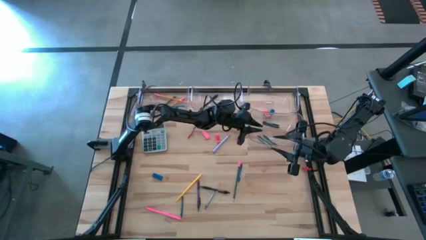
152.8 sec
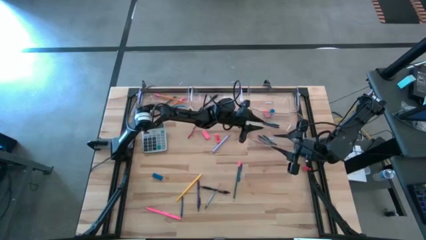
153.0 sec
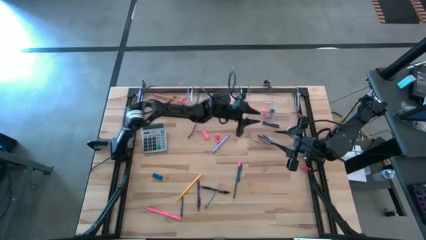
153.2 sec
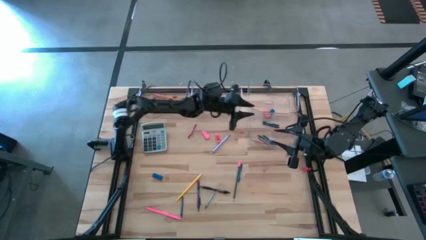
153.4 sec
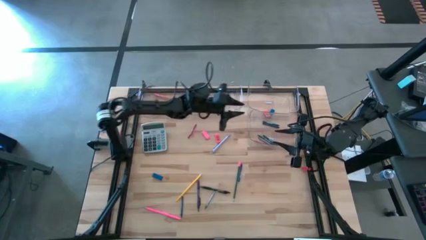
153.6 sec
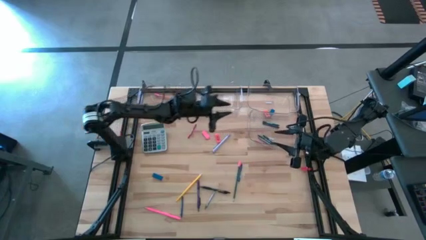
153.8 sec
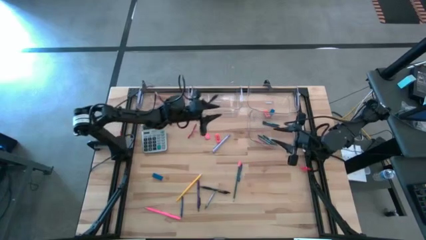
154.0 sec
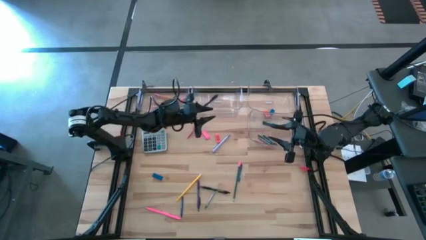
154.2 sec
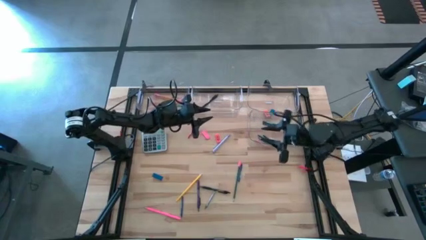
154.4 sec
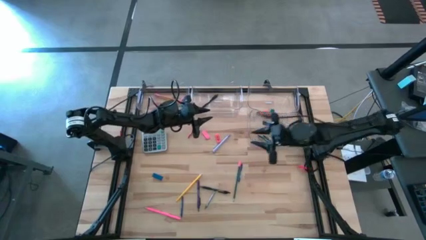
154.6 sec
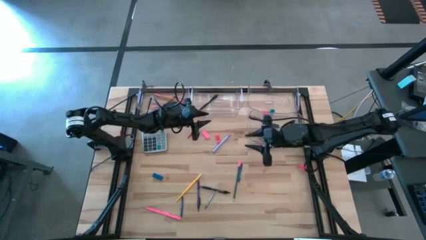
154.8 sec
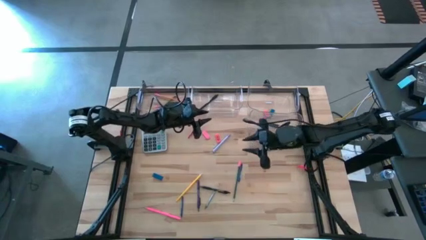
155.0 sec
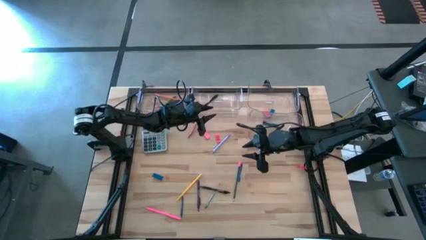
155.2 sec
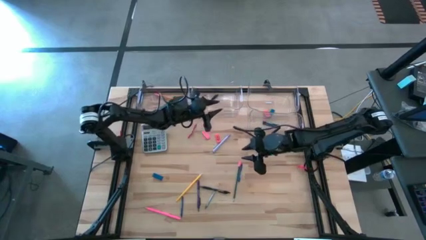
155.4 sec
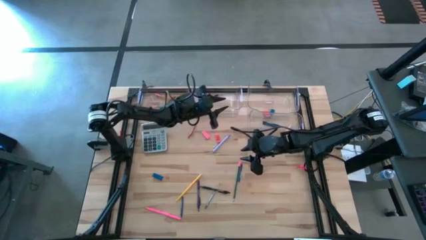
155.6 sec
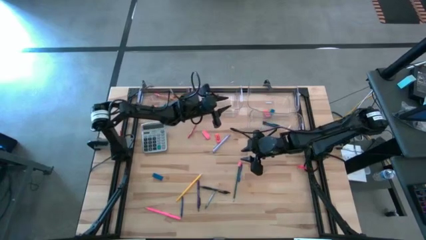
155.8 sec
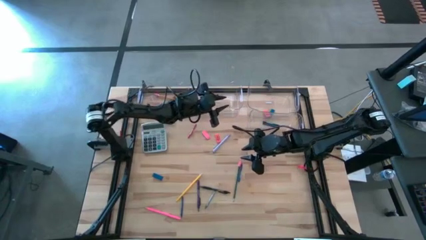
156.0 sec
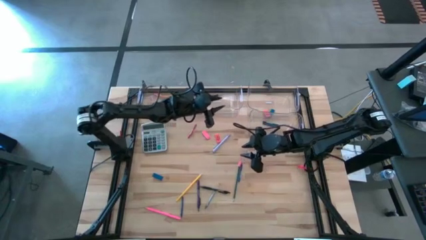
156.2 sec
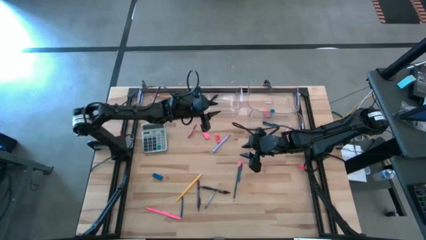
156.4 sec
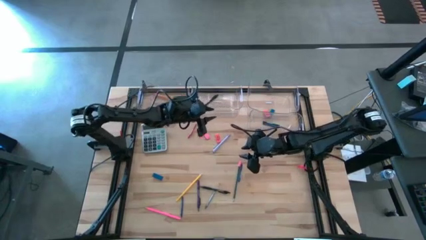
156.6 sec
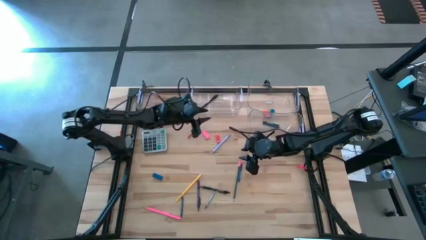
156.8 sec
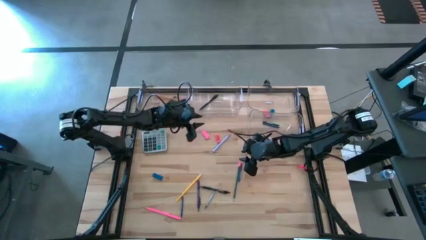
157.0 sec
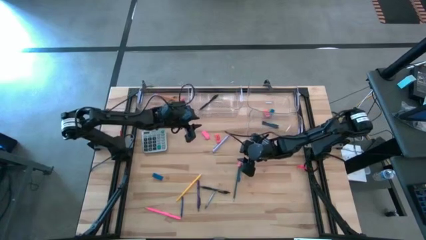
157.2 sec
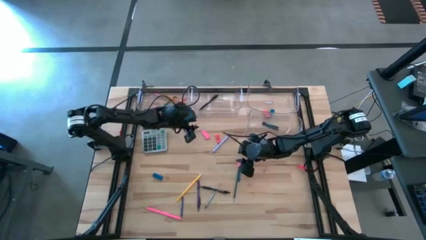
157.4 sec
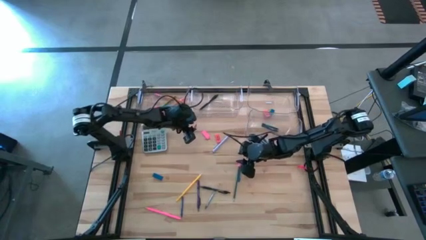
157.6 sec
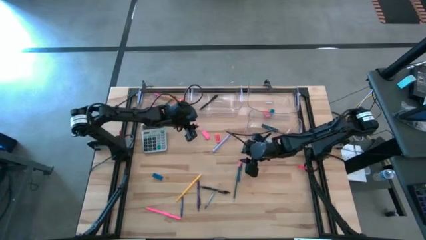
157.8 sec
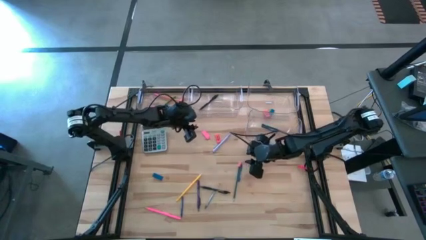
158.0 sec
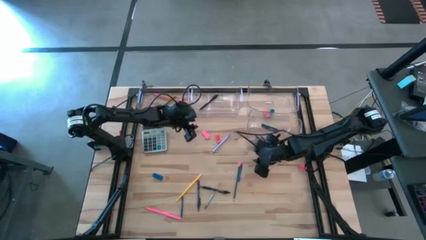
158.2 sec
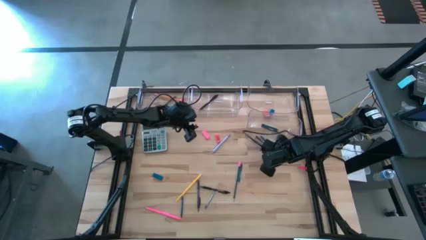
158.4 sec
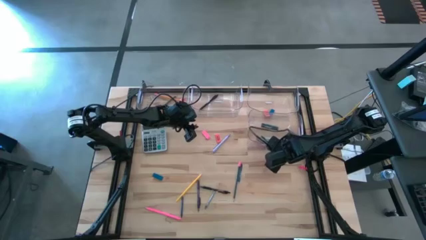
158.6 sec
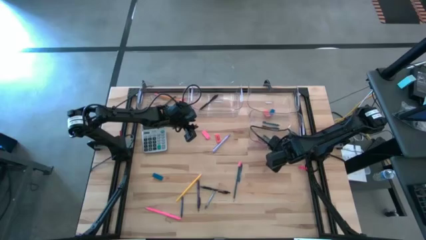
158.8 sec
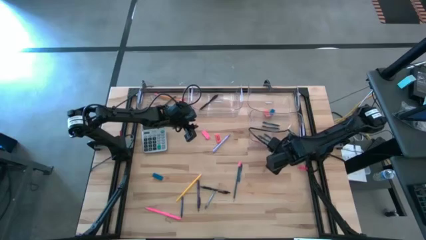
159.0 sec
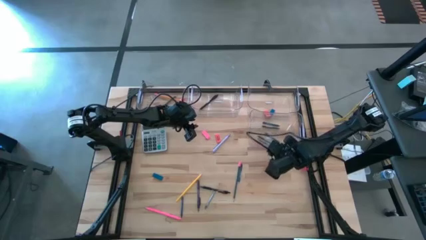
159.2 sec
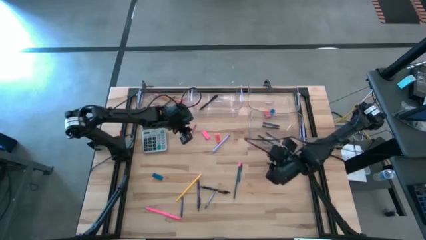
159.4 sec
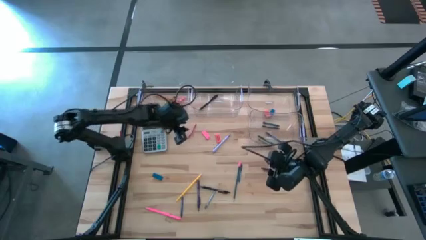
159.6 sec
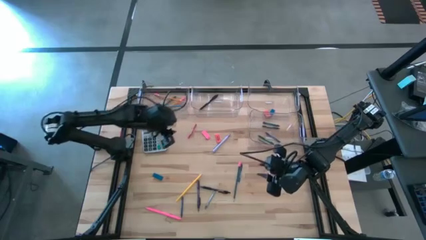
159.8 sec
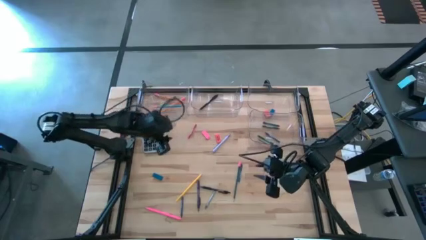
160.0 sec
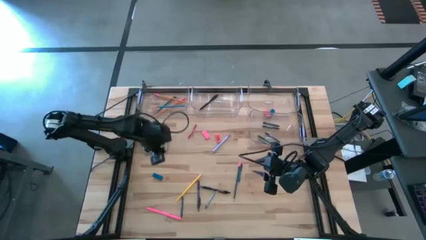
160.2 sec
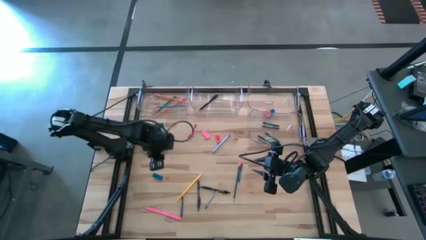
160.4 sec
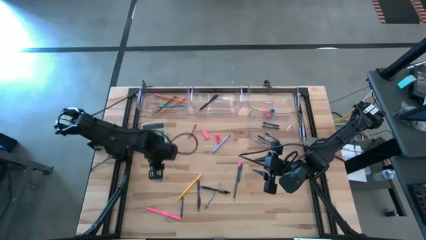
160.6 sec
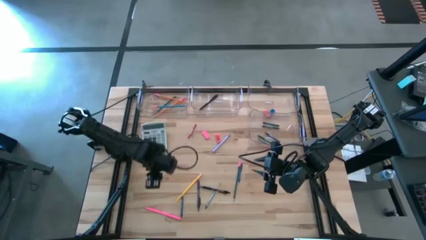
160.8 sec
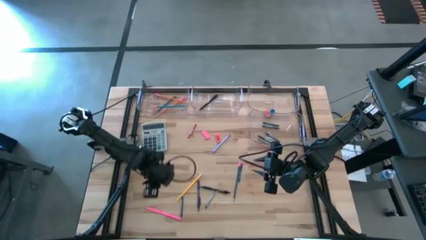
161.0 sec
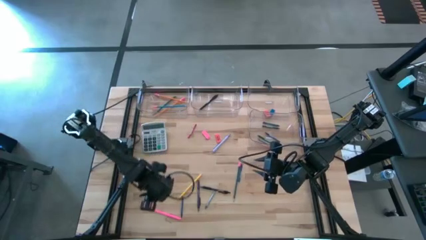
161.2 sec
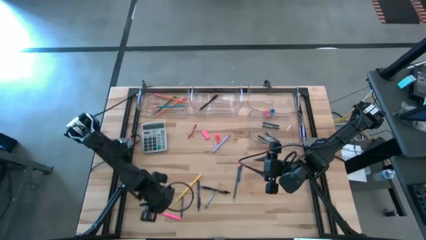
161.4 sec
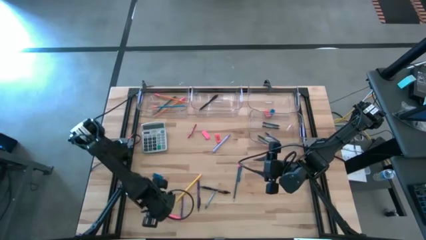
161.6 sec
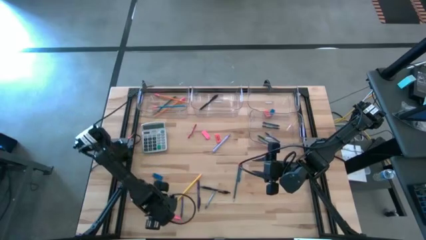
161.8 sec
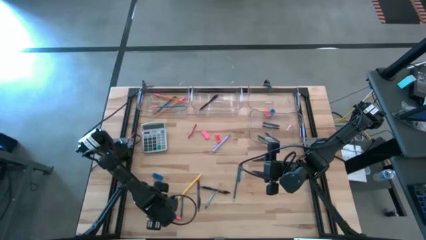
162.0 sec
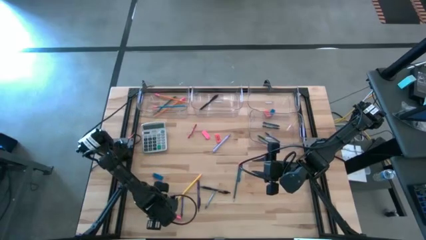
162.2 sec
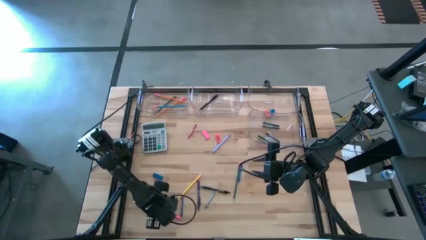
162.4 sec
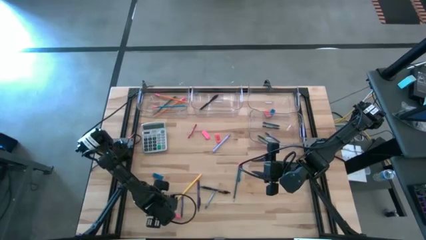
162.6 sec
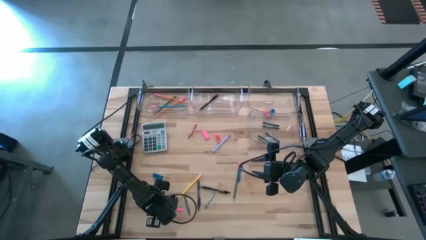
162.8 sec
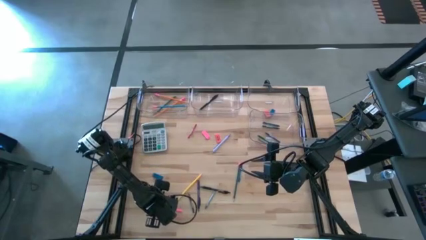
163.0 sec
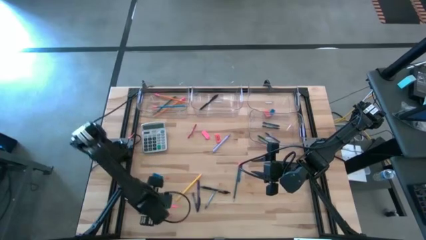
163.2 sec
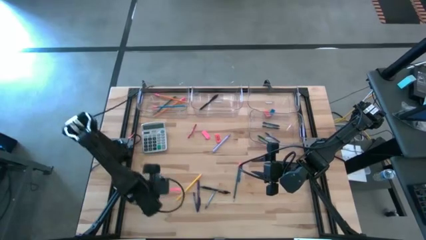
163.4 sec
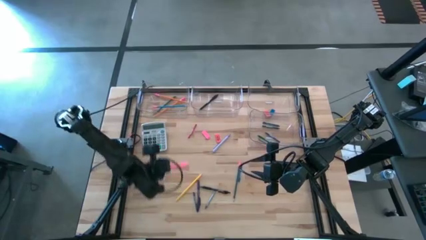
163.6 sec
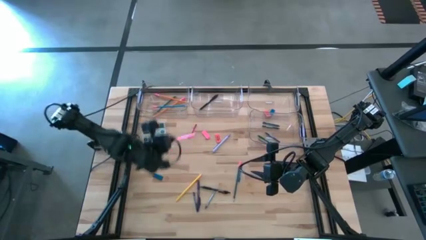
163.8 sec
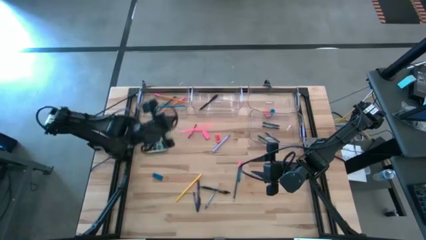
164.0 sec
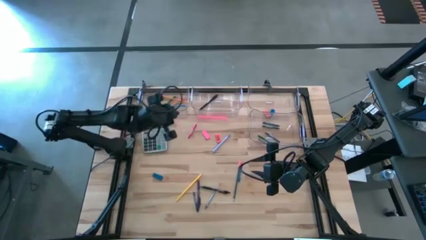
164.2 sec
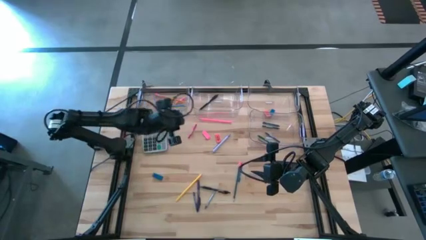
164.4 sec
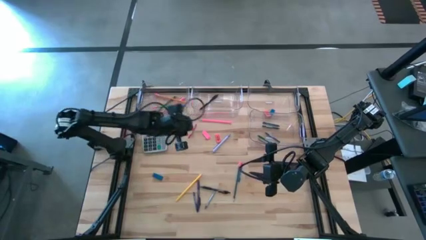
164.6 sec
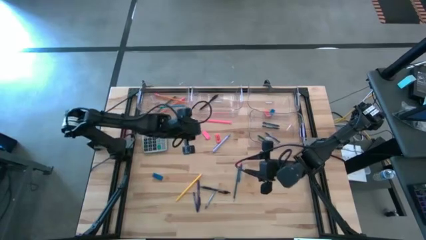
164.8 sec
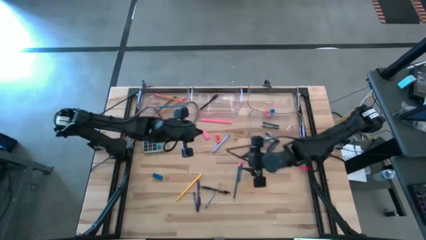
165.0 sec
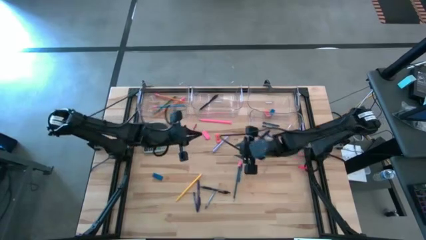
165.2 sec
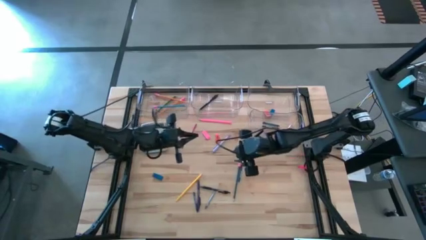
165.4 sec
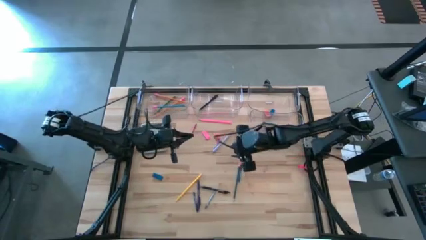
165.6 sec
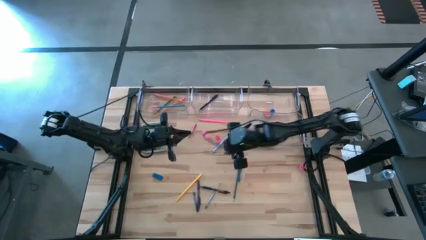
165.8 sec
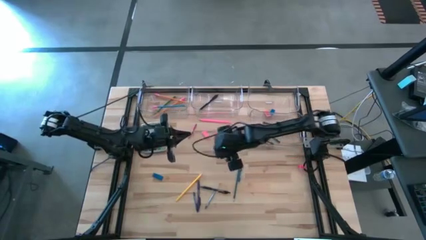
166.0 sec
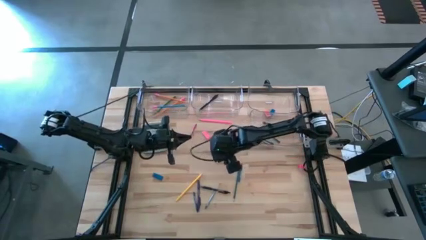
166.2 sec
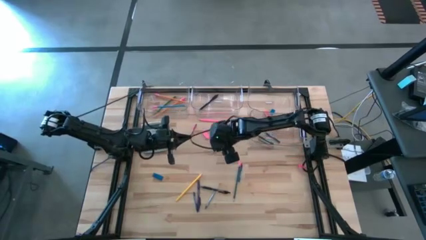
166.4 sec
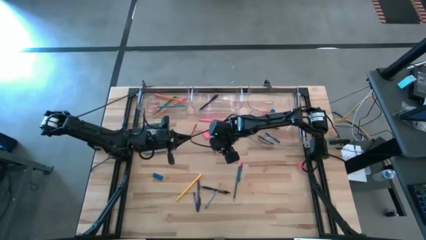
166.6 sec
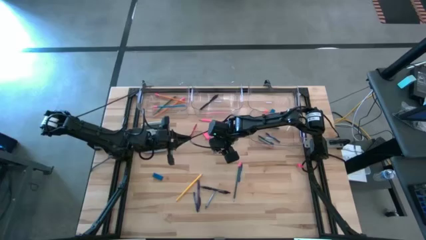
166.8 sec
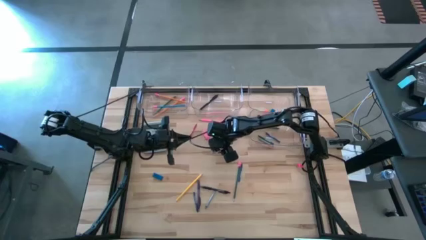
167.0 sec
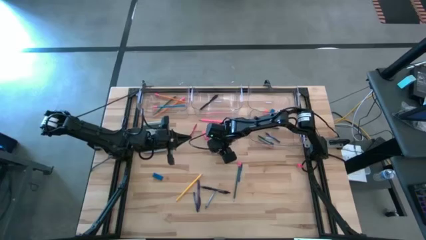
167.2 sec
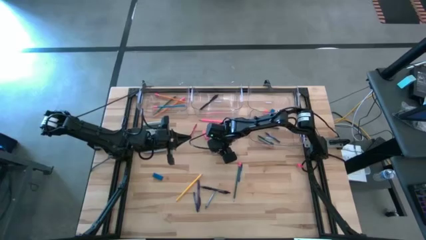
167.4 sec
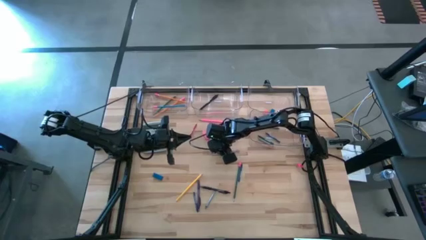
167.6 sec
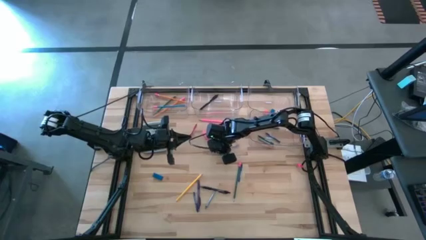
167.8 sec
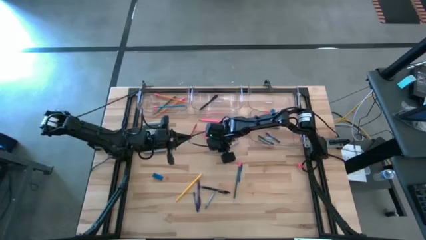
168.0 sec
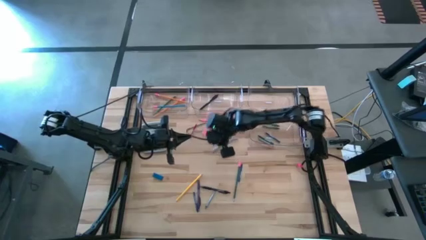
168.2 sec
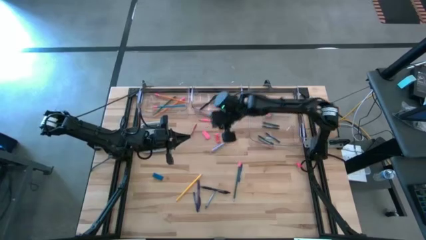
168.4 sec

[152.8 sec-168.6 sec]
Task: Sort crayons/erasers/pens/pencils in bins
Put the light blue pen into the top middle transparent bin

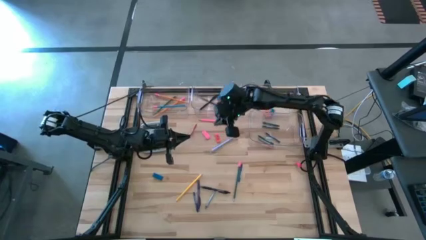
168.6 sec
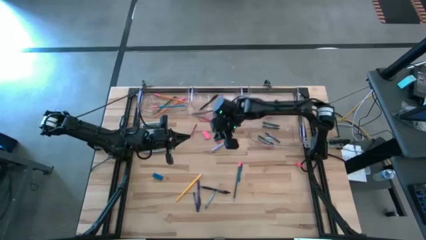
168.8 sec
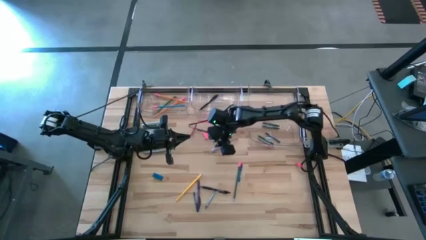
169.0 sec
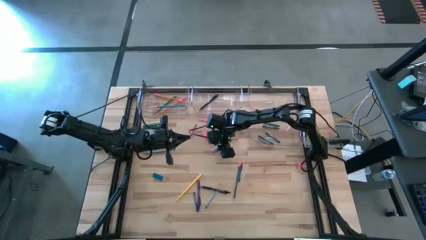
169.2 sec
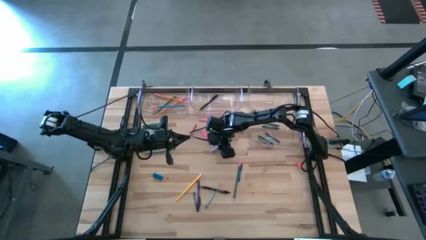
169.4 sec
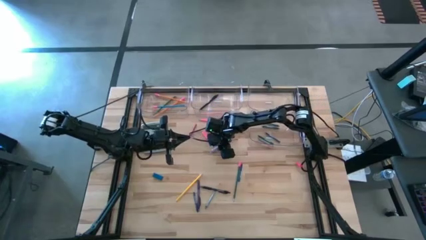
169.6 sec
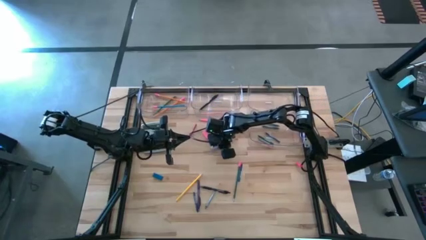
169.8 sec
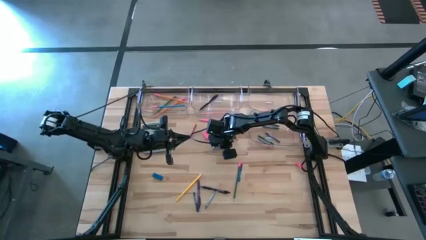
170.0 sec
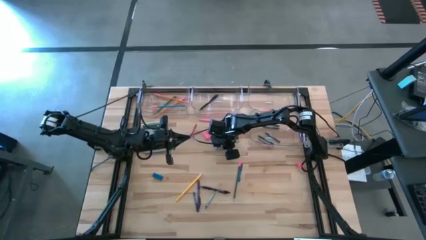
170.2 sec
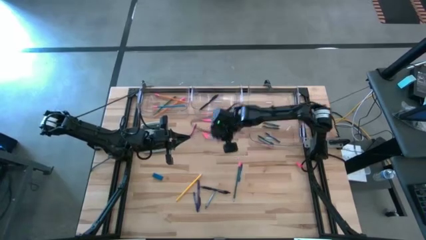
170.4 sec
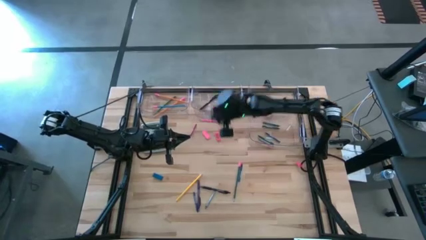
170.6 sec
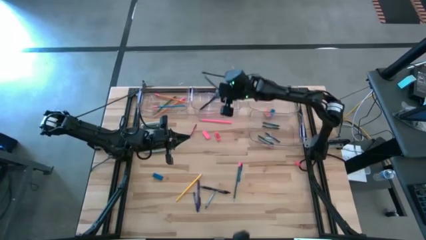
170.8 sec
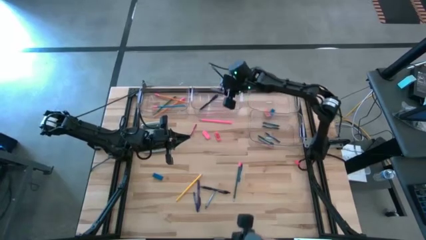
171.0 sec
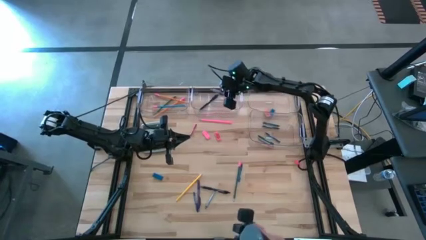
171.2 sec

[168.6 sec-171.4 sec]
Put the light blue pen into the top middle transparent bin
